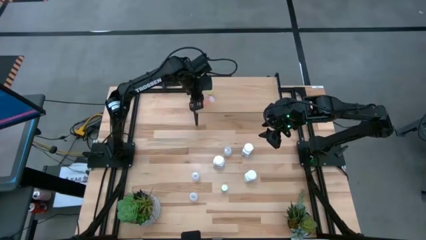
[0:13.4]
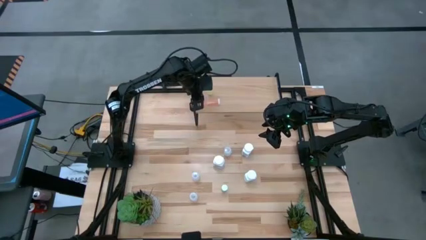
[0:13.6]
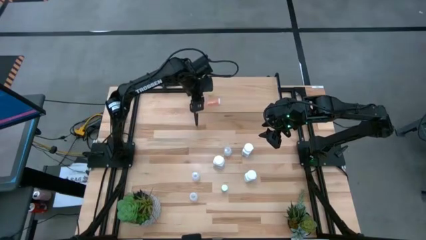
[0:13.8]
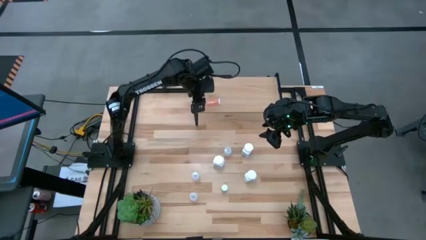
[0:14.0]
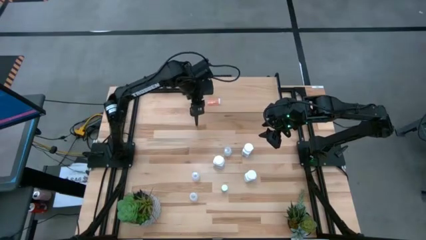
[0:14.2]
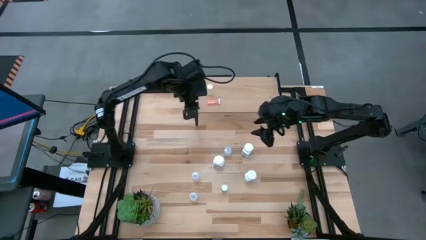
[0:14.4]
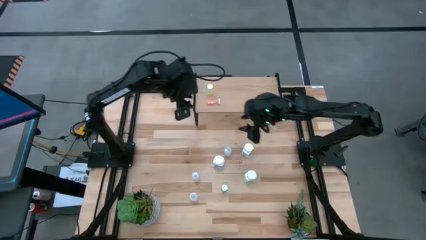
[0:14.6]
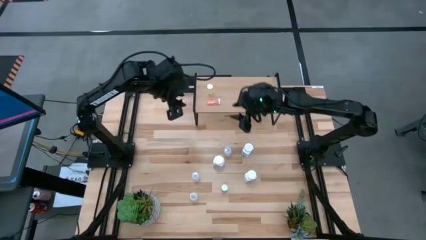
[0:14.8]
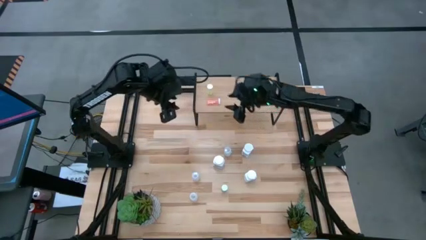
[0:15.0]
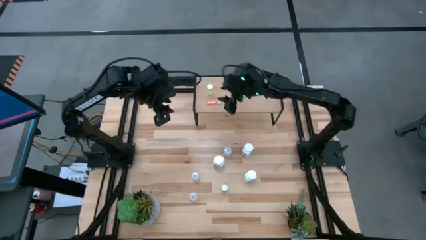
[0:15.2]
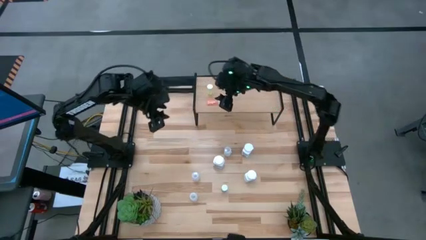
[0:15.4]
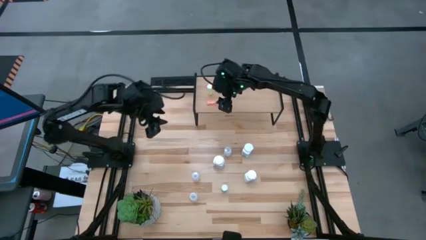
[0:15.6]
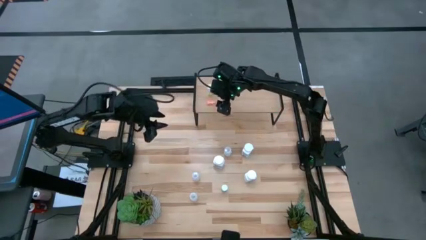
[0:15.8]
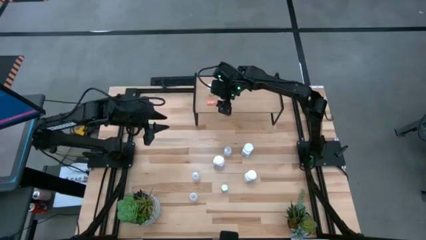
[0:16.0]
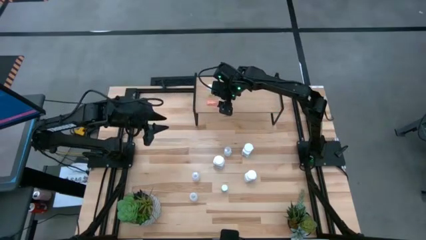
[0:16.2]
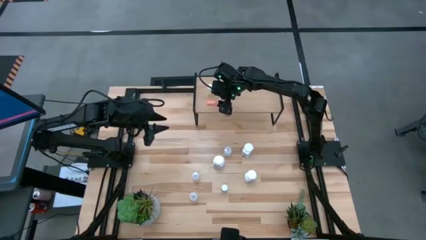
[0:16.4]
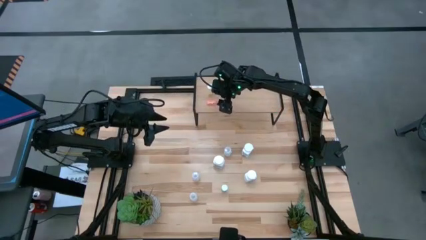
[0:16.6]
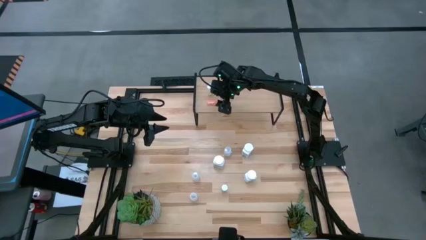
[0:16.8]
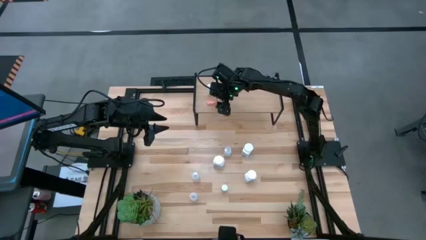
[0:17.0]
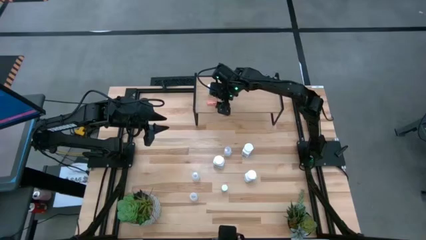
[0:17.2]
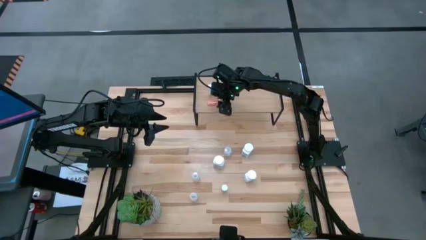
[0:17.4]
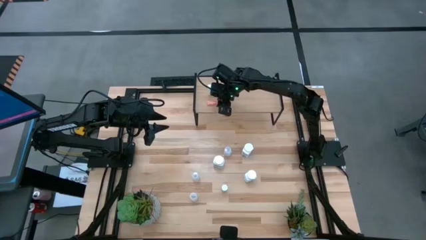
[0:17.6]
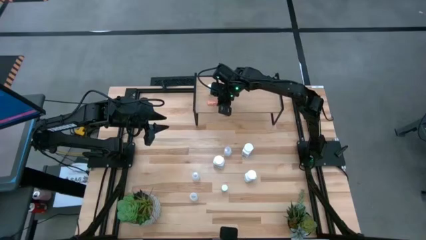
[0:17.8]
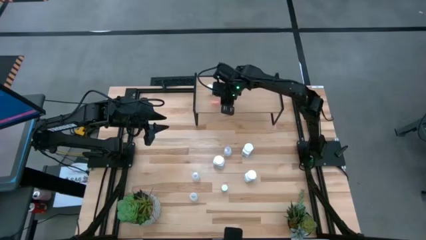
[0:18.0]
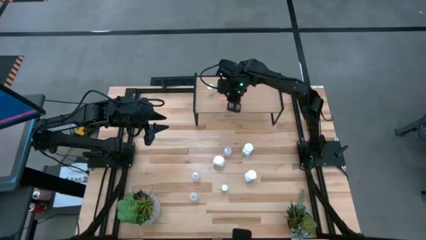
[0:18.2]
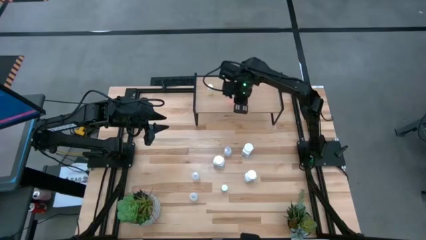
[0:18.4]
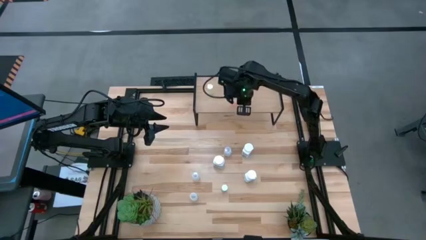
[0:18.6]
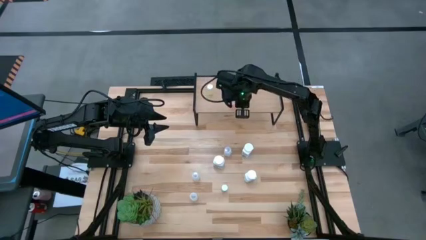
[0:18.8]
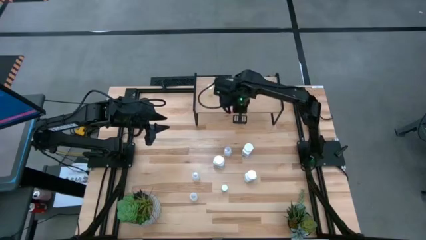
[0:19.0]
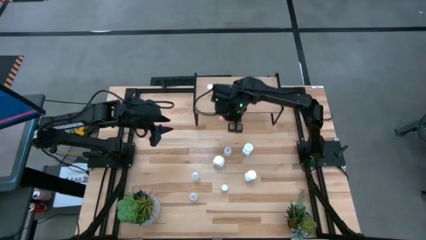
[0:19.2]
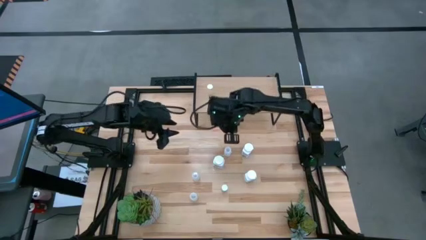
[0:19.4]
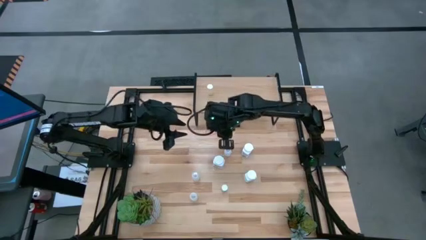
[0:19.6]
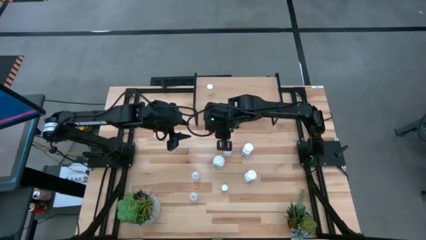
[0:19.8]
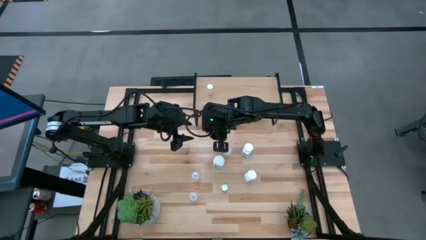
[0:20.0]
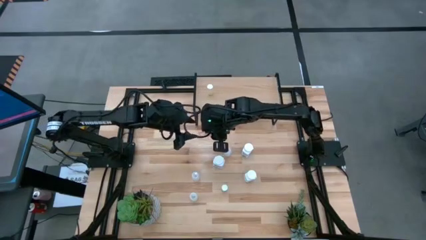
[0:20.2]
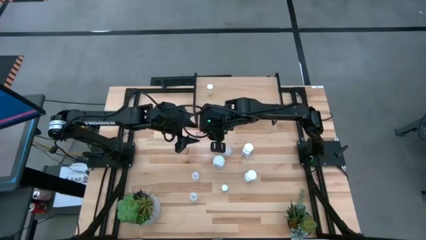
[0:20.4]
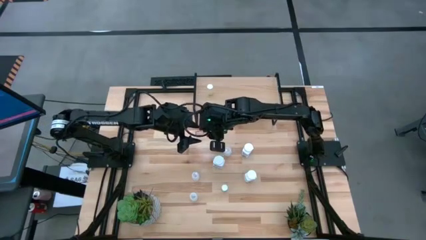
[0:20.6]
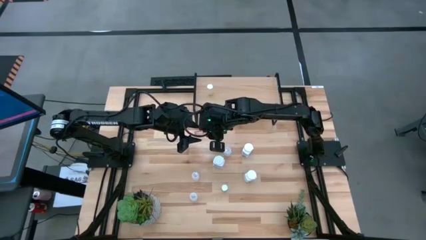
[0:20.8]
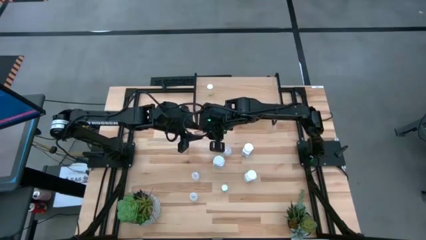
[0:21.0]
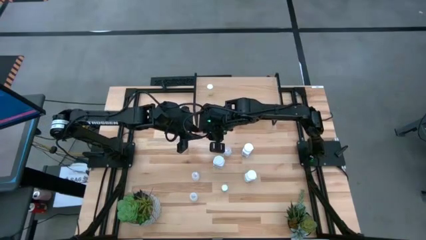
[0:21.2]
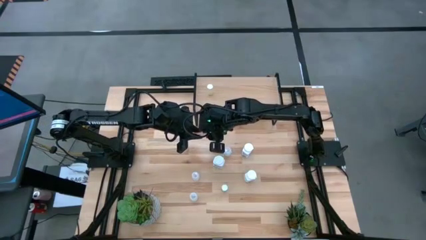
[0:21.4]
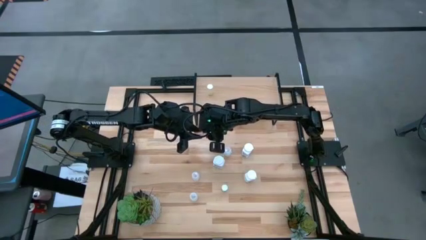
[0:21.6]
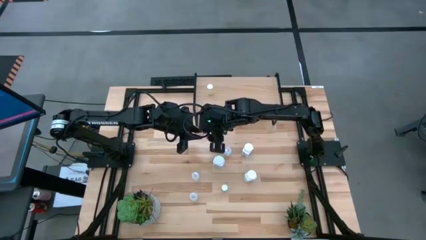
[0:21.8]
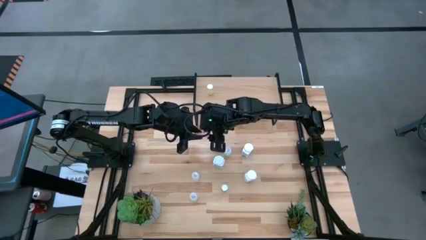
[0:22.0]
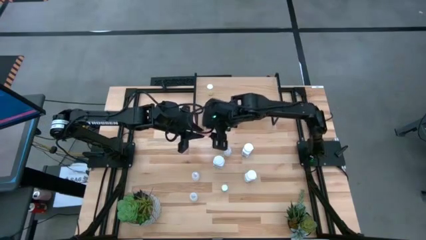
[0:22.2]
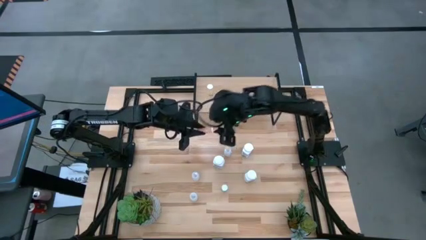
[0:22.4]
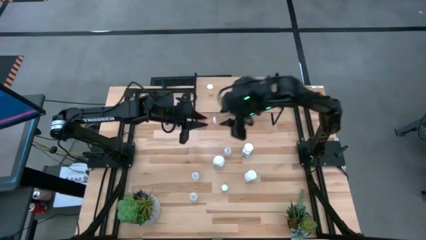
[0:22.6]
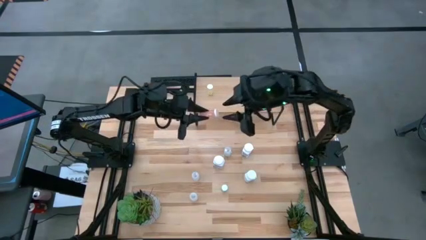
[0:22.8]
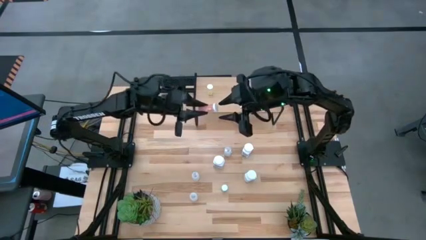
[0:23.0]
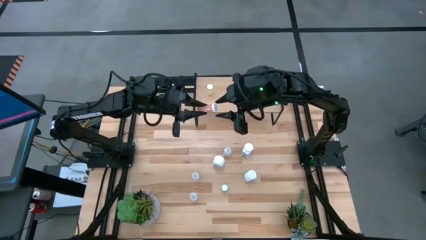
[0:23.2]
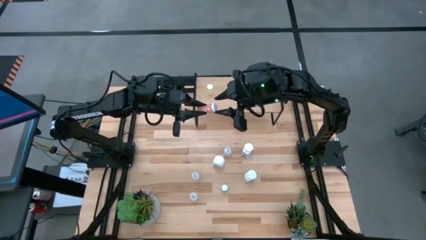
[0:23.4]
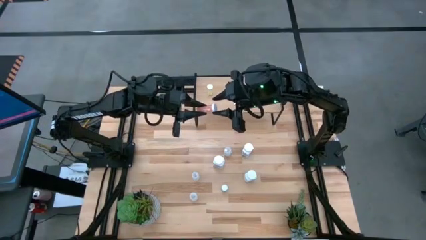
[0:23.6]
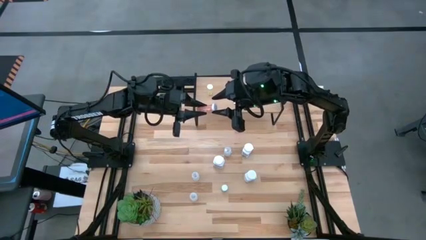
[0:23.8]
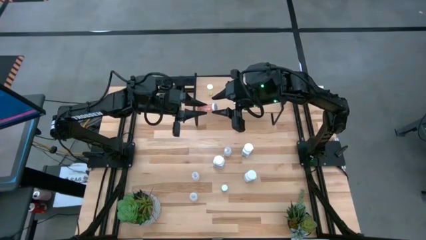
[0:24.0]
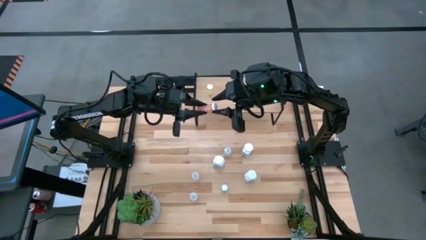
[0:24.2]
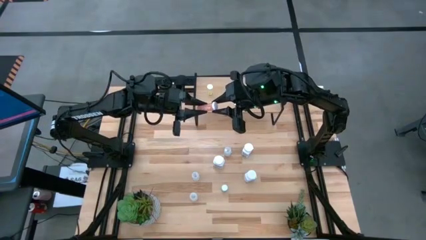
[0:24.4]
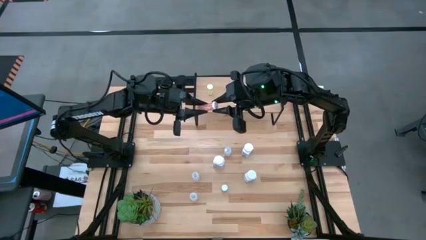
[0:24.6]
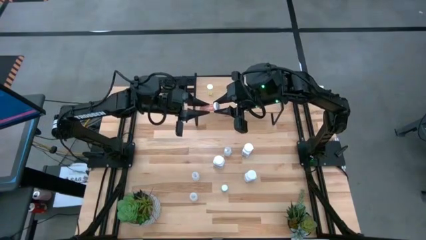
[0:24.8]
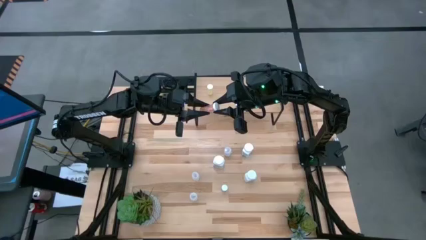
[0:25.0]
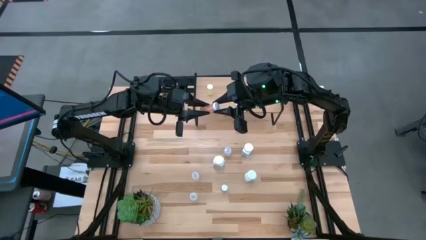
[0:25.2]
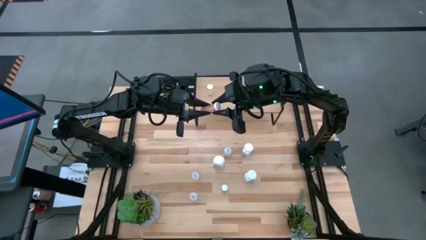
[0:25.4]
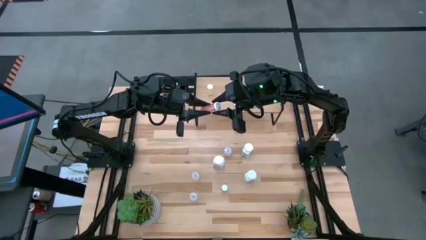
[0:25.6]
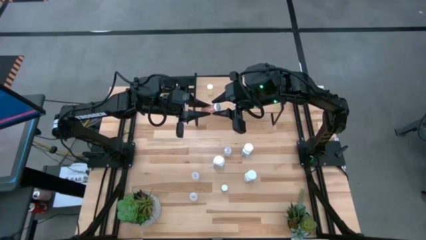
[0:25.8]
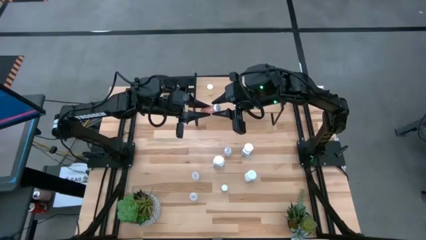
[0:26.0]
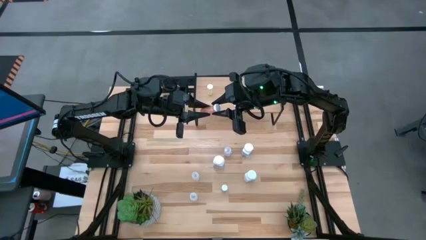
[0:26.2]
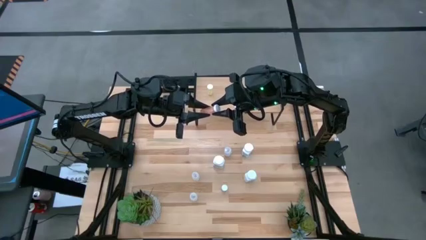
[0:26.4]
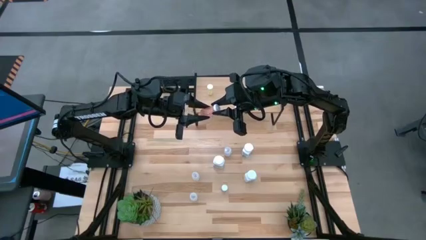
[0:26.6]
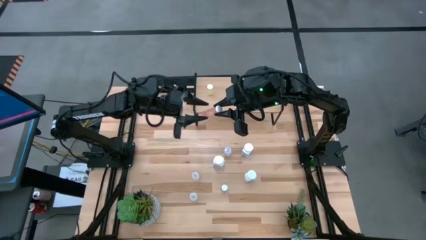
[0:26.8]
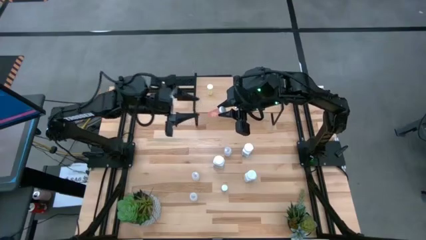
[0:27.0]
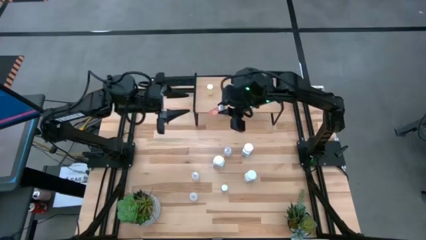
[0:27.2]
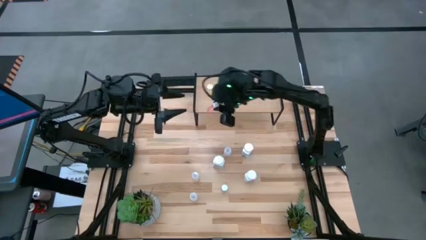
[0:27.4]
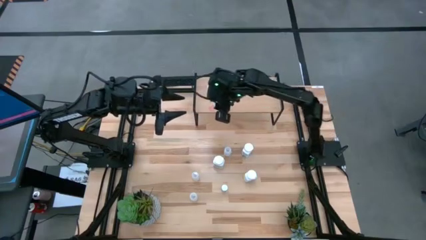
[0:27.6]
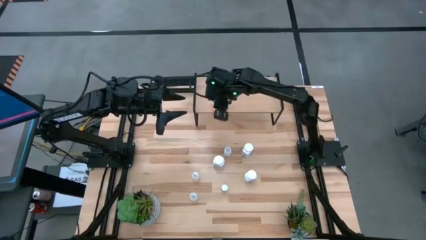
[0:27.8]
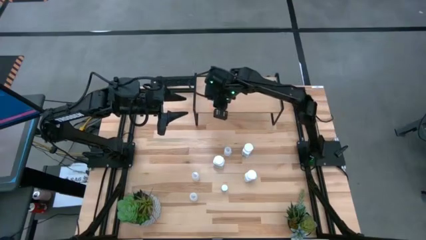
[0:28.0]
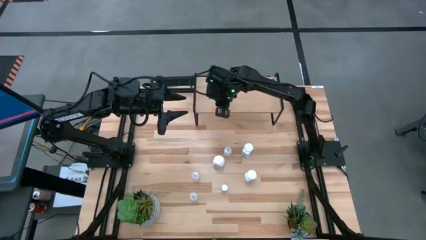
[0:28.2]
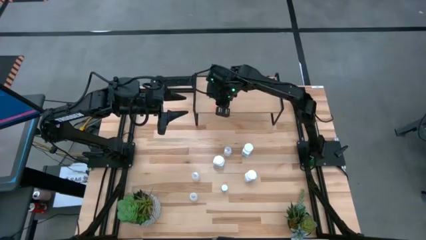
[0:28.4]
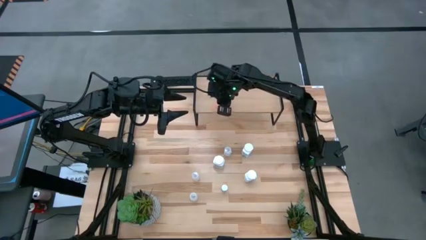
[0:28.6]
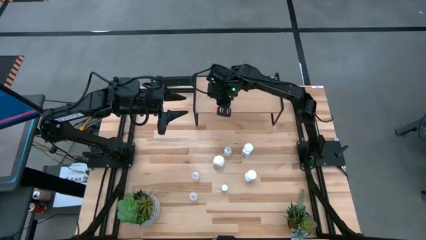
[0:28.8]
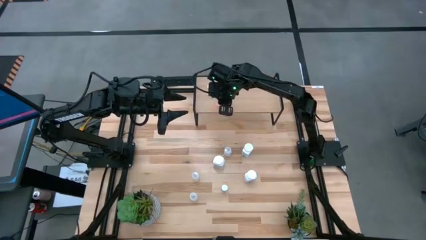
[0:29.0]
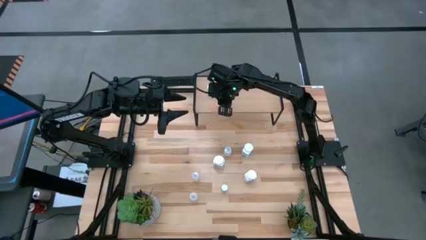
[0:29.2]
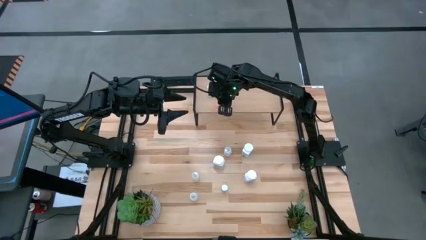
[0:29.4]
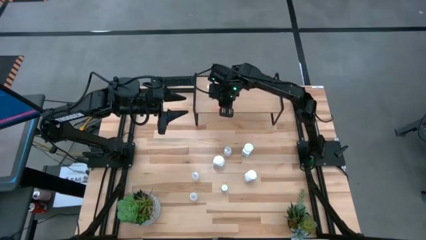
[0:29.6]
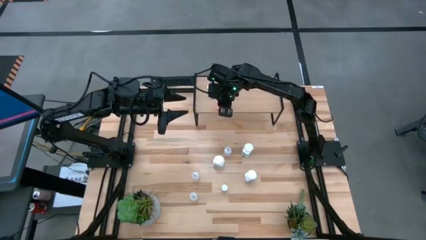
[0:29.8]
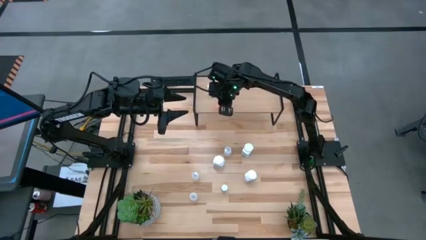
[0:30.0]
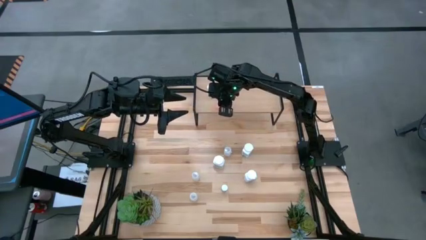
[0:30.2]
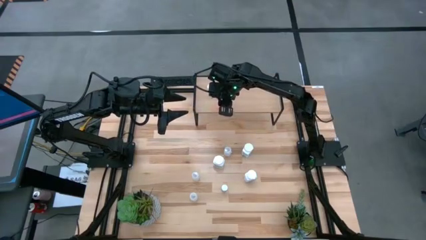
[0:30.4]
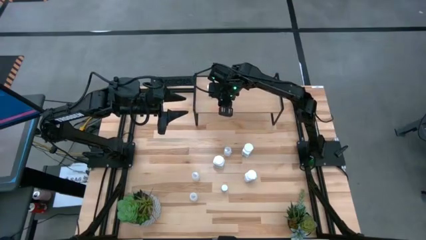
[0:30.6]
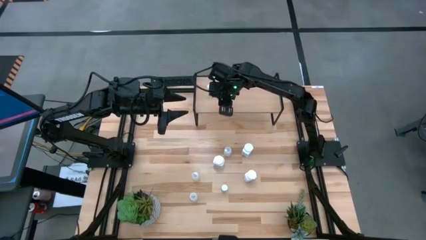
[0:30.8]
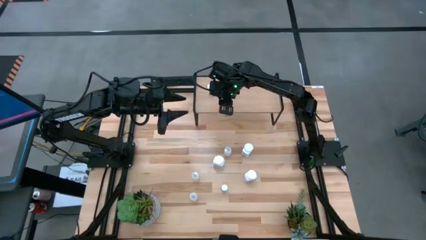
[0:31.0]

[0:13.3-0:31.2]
Task: Pick and place medicine bottles onto shelf by color
Put the orange pill bottle on the shelf
